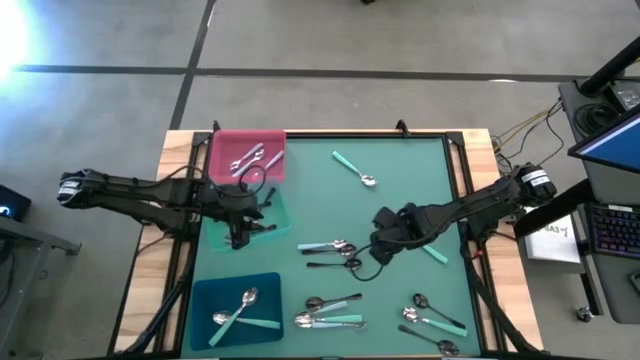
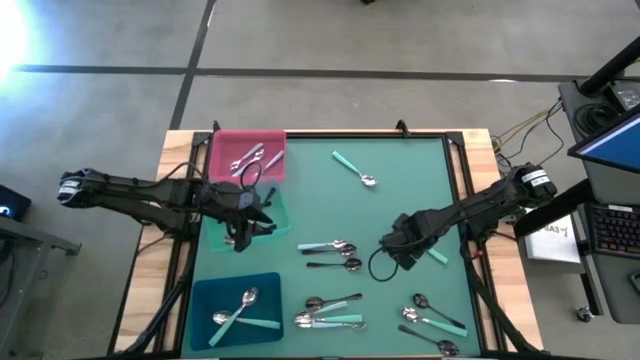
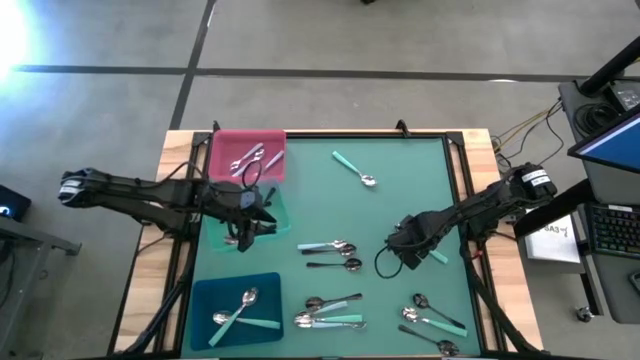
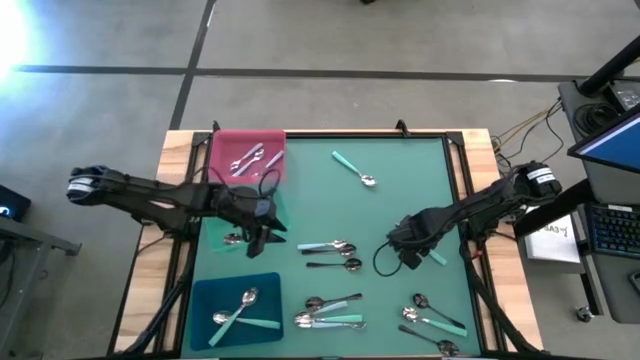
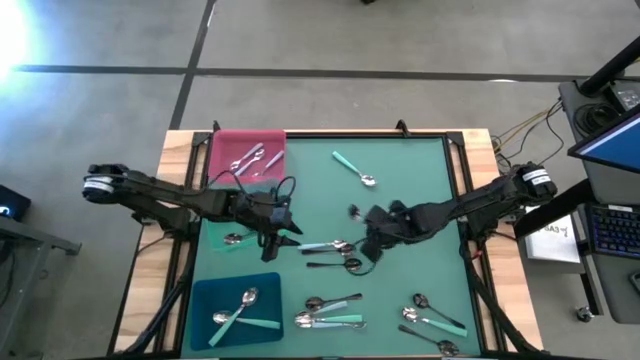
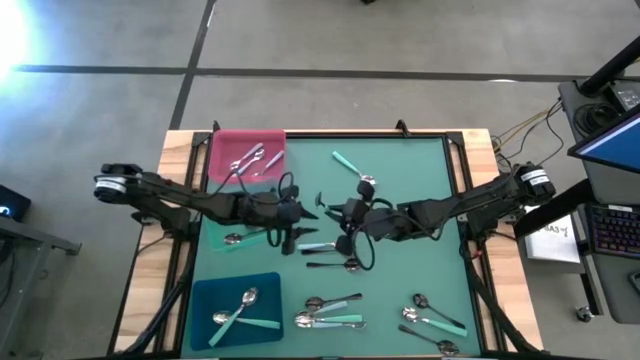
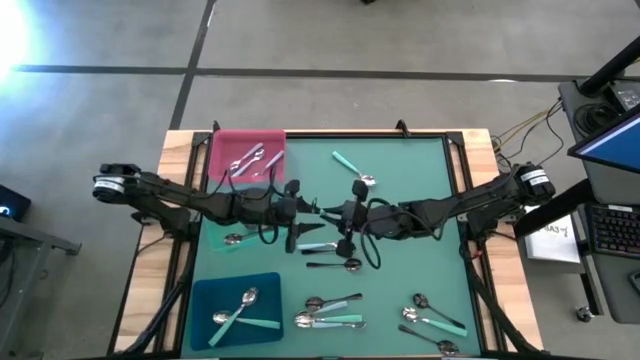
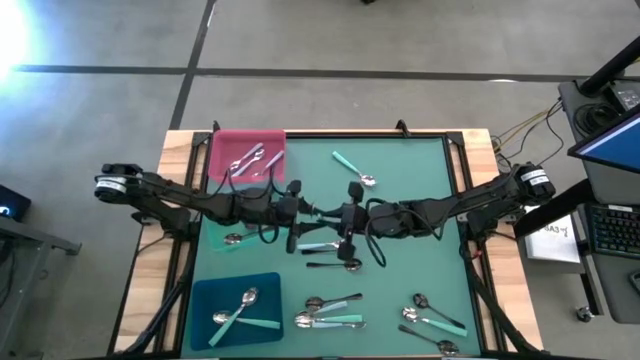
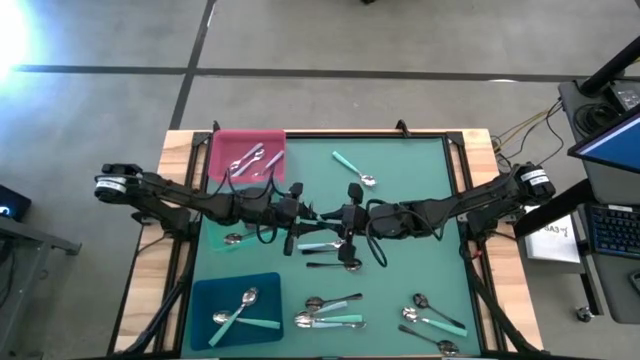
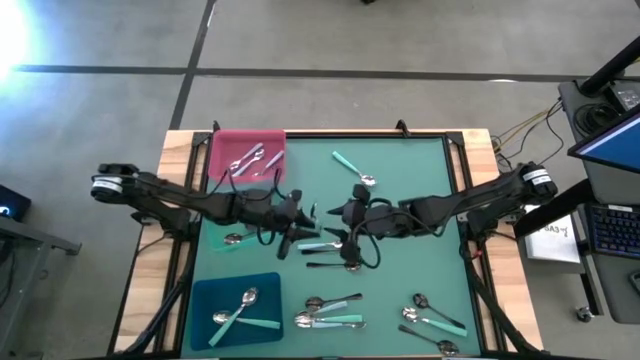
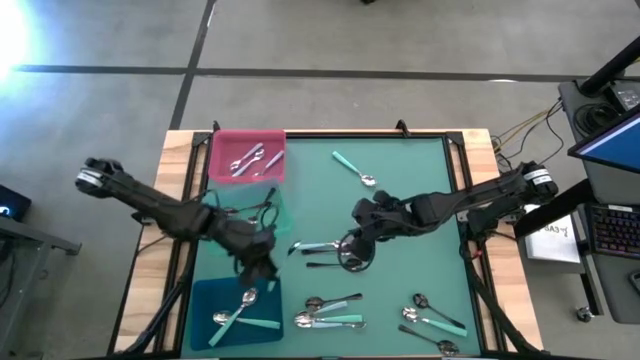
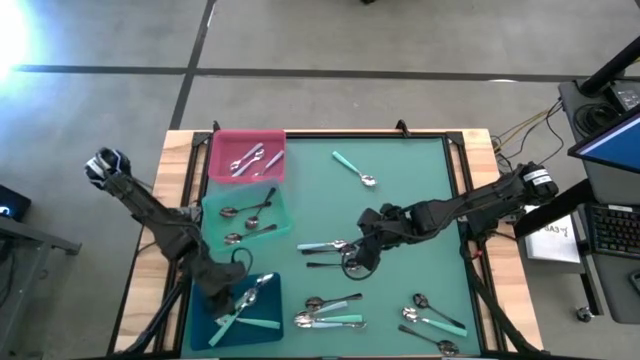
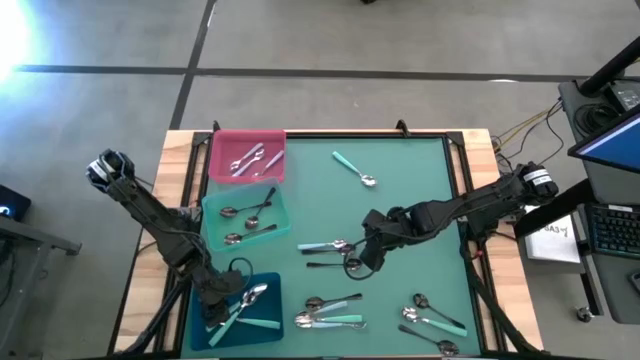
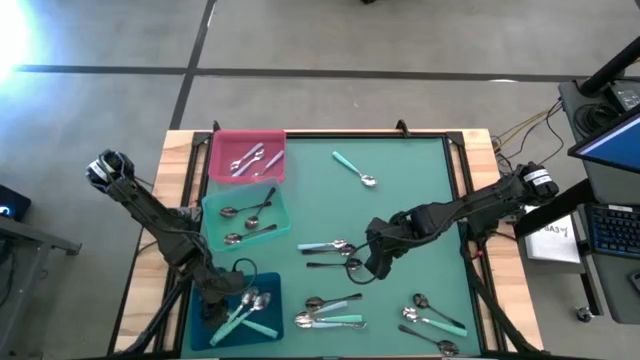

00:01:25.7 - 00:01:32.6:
Task: Sort silverware by color (type)
Put the light blue spoon into the blue bin

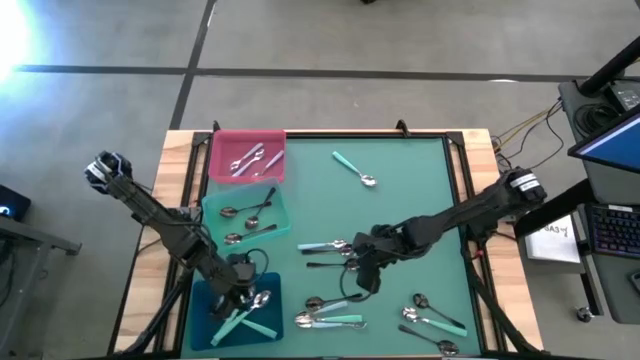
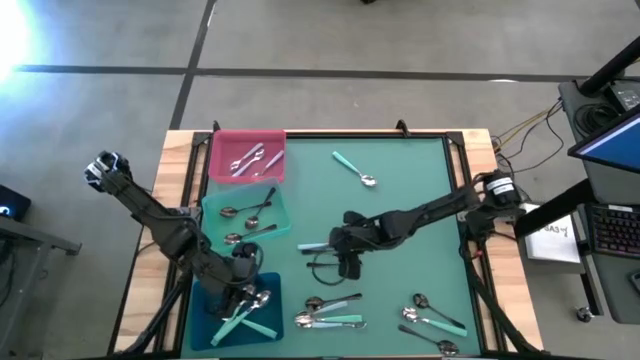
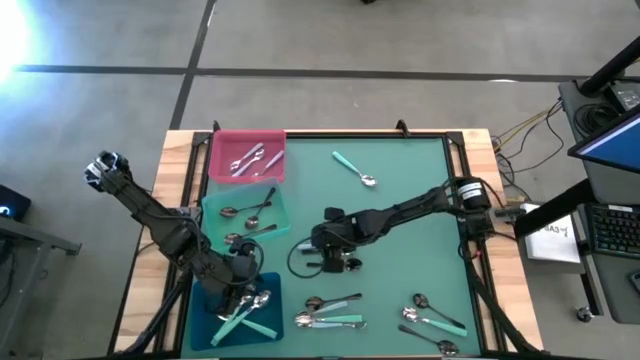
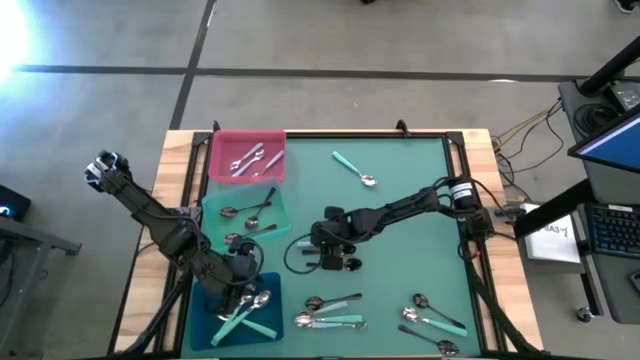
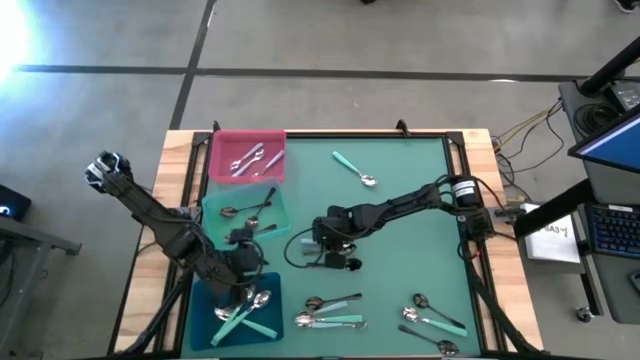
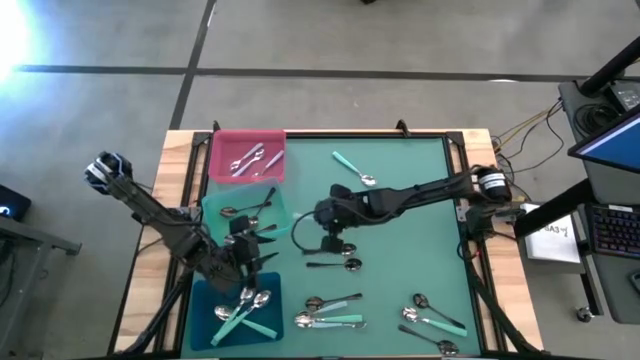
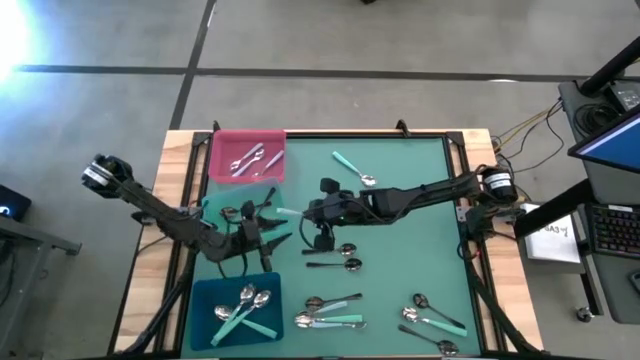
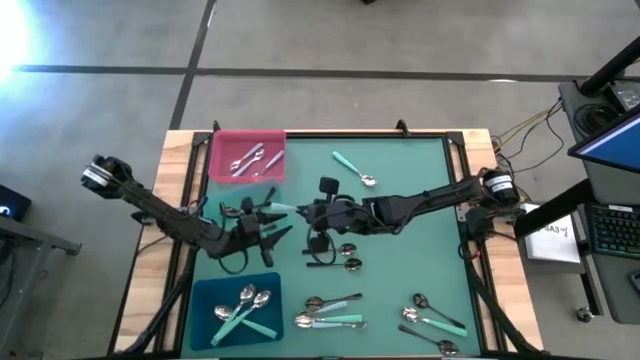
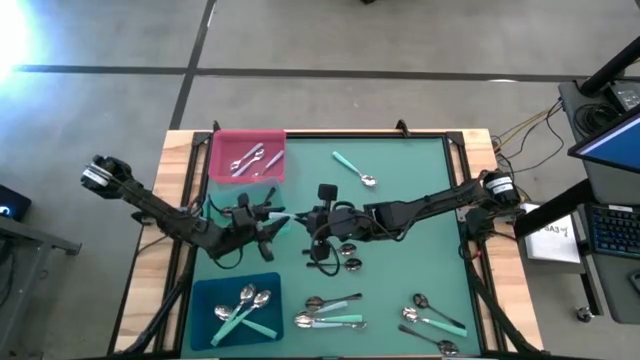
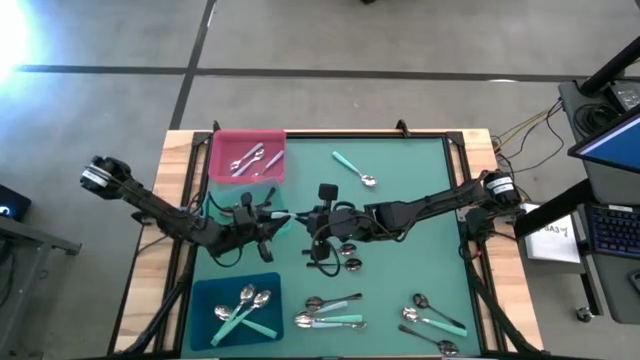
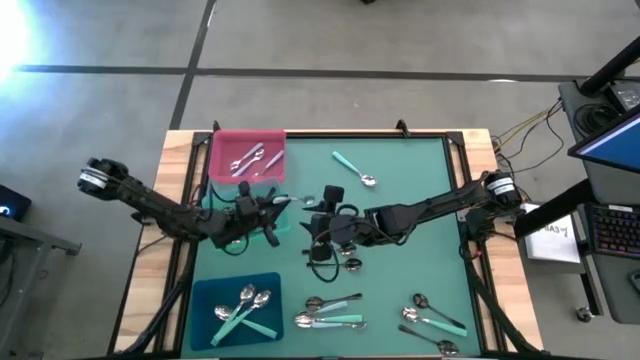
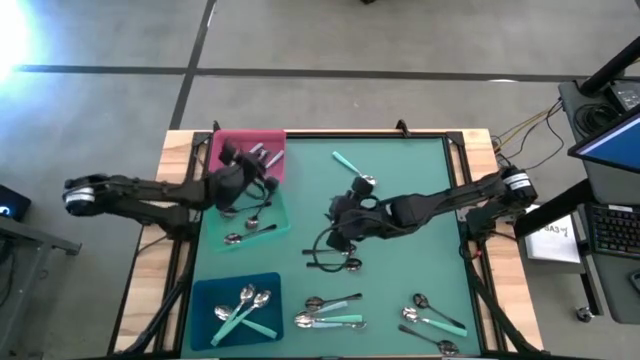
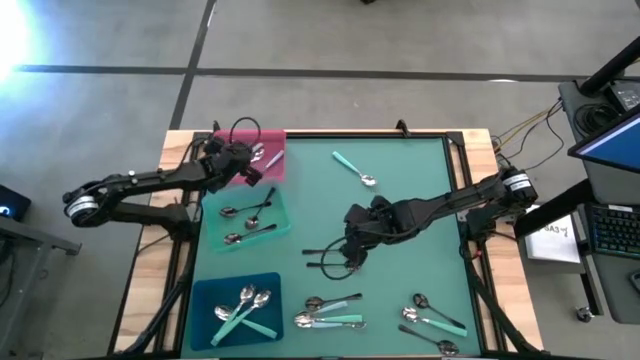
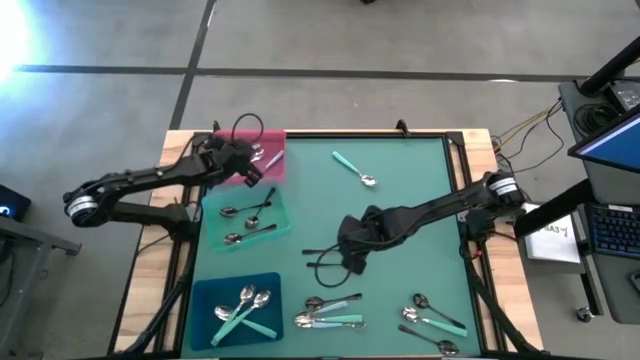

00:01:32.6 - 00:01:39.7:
Put the blue spoon into the pink bin

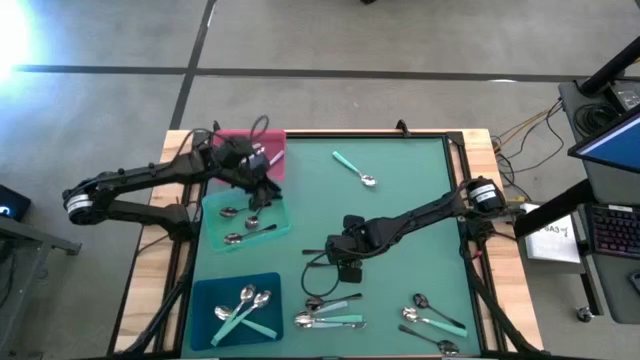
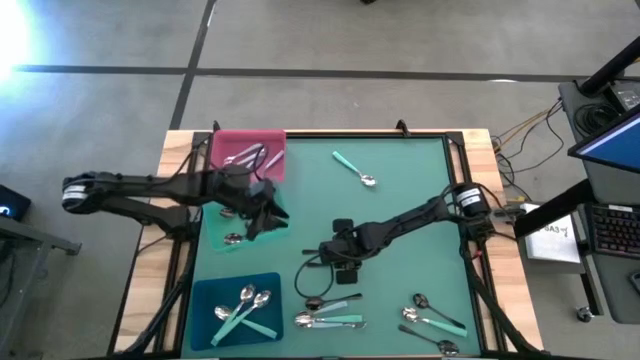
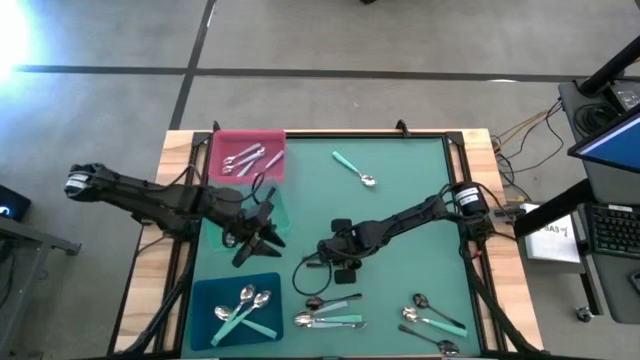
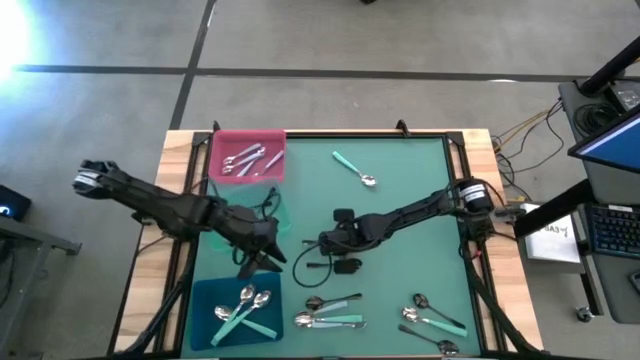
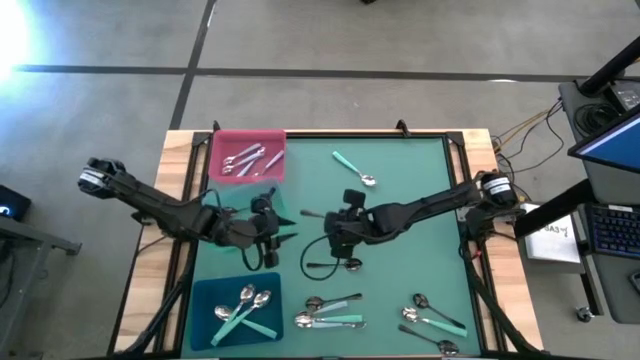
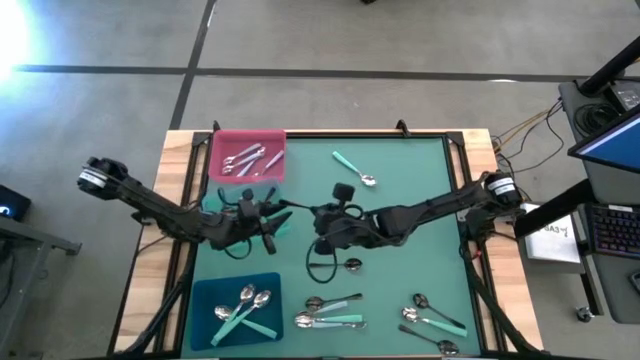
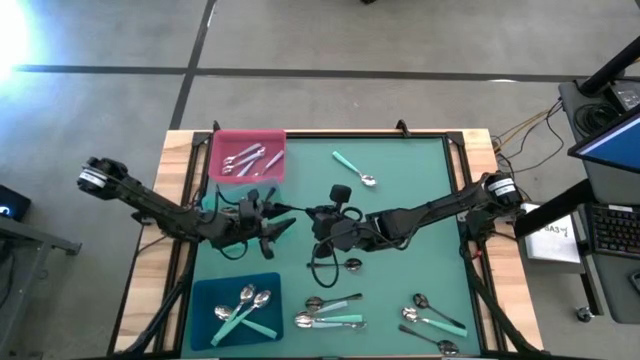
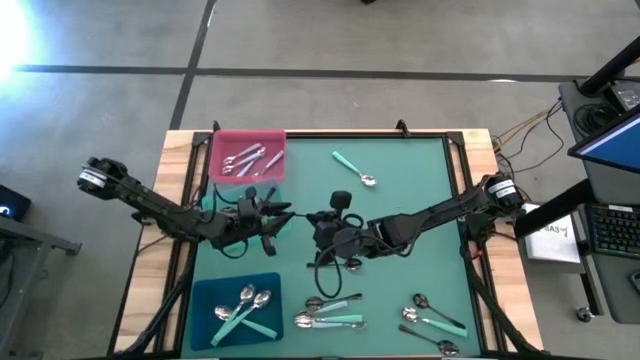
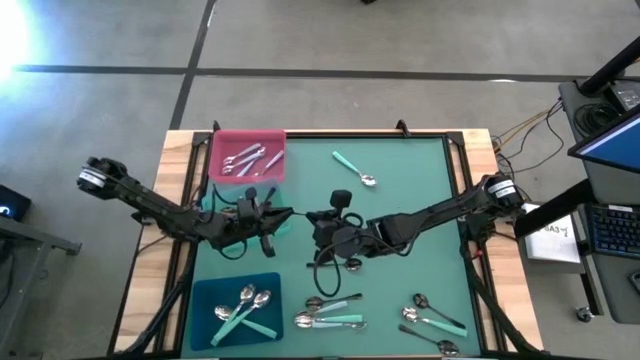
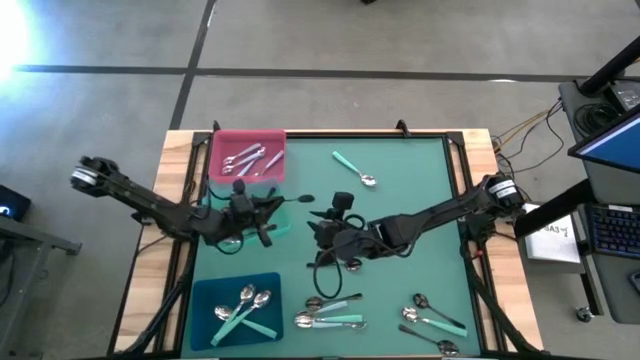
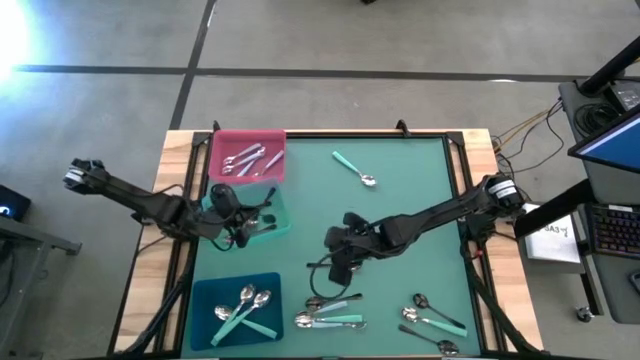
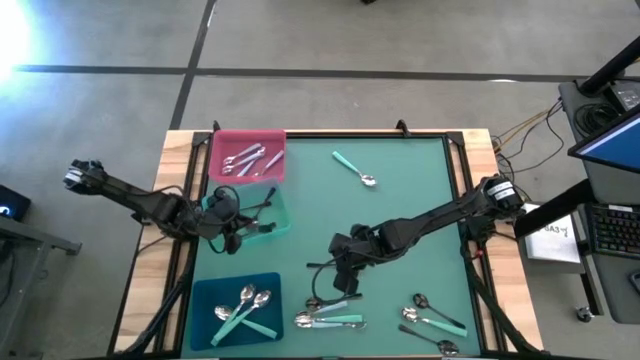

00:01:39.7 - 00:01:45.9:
Put the black spoon into the green bin

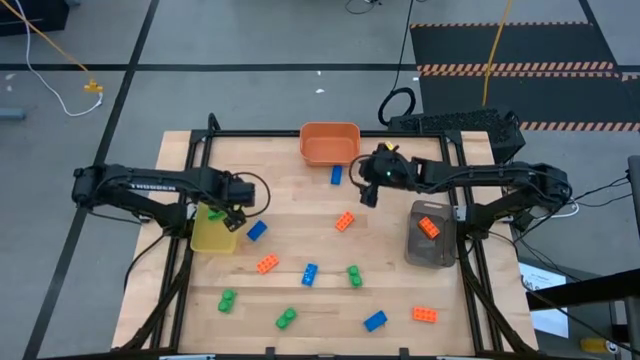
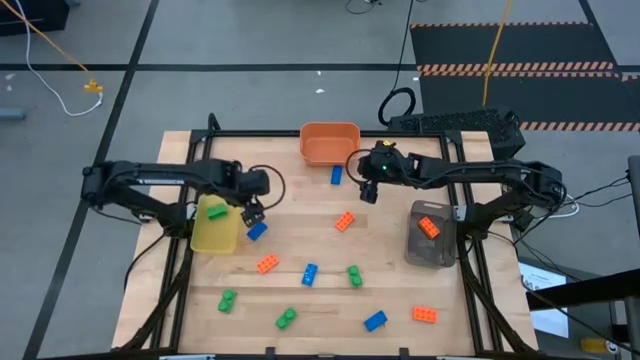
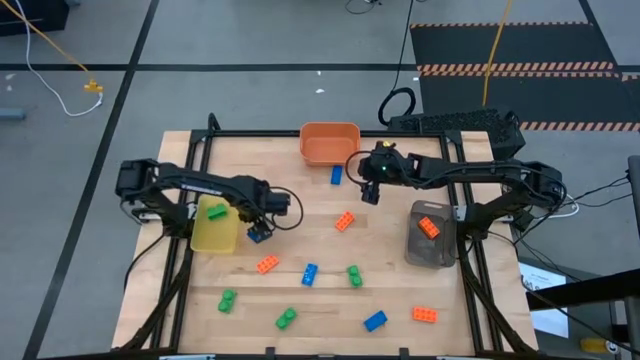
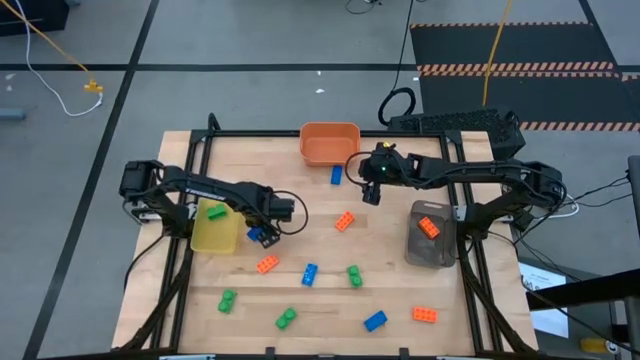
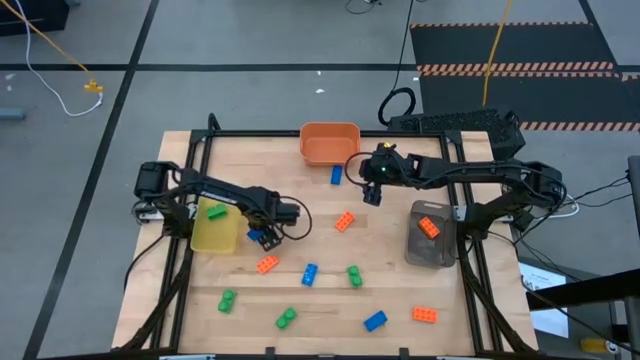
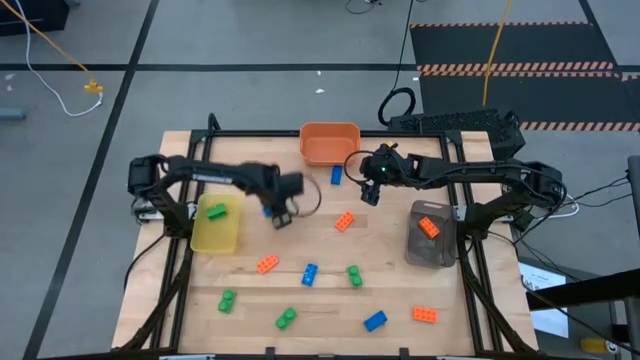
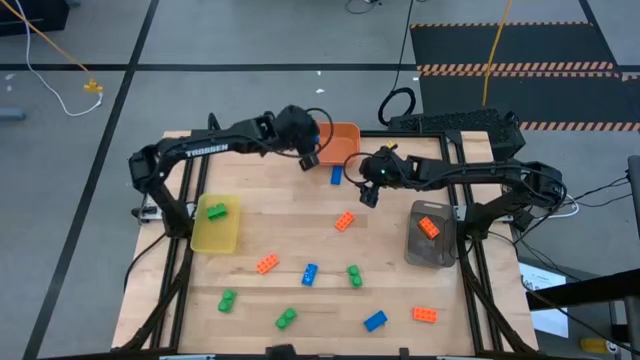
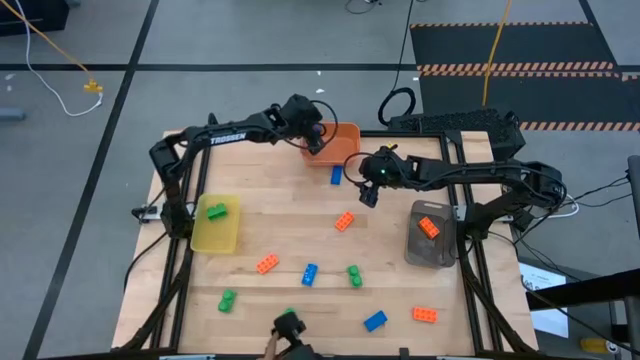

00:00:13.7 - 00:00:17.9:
Task: Sort & place blocks by color
Put the blue game piece into the orange bin
